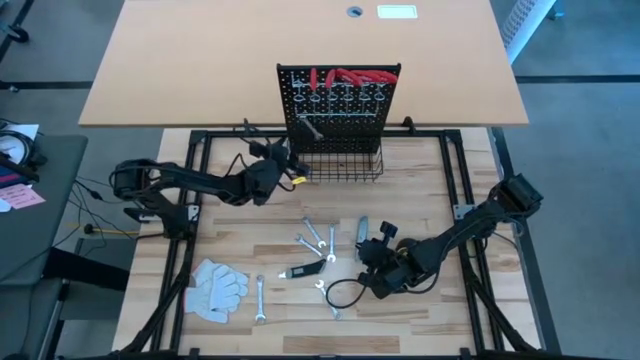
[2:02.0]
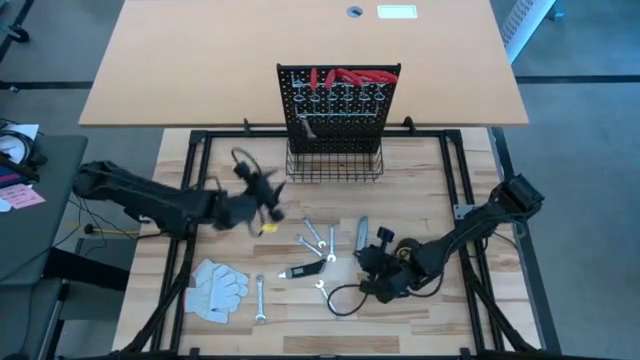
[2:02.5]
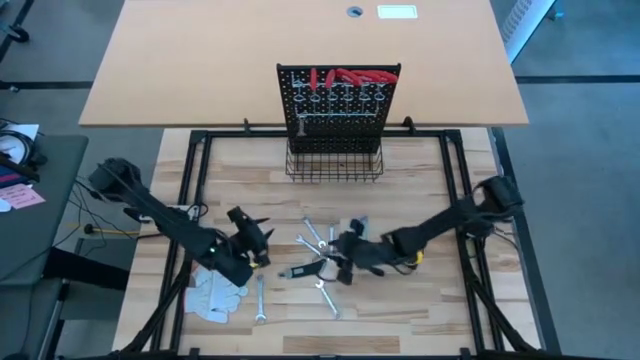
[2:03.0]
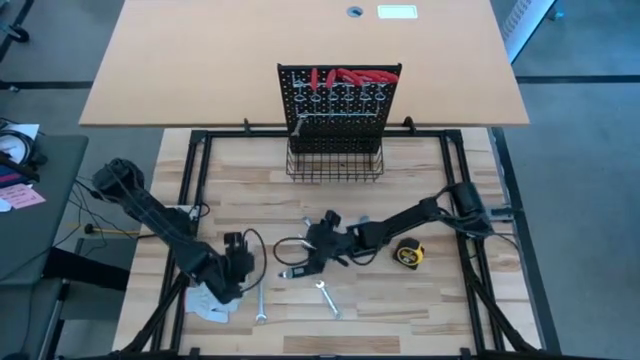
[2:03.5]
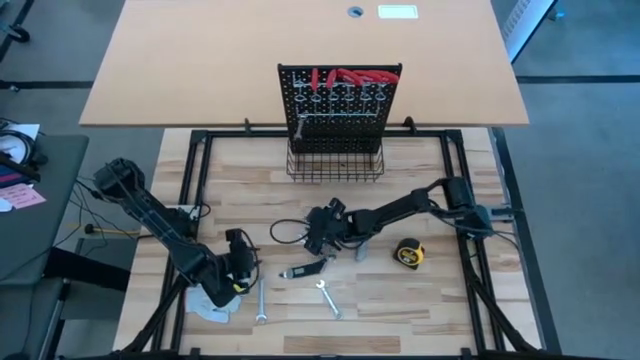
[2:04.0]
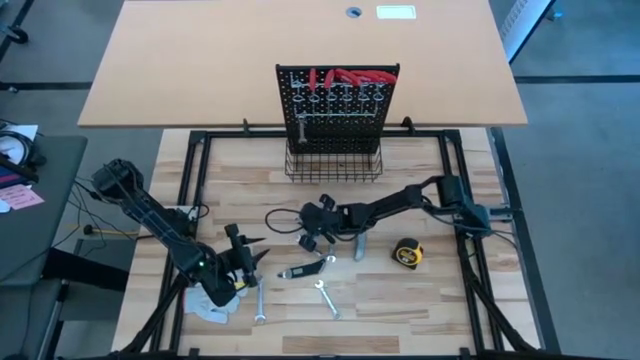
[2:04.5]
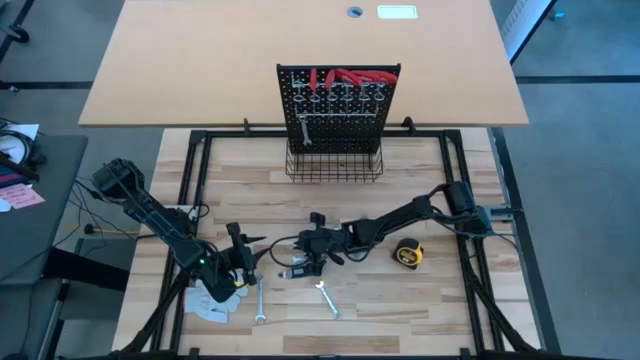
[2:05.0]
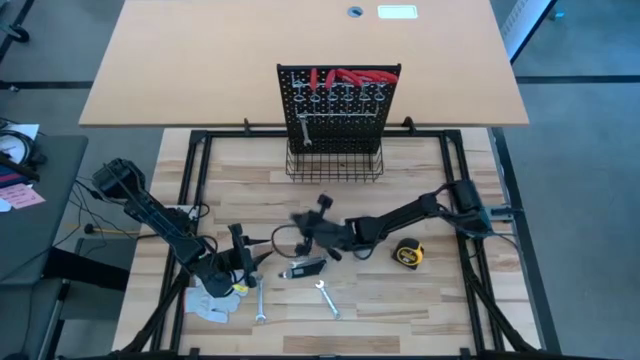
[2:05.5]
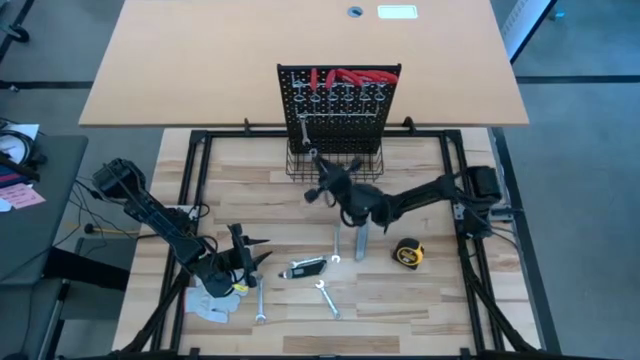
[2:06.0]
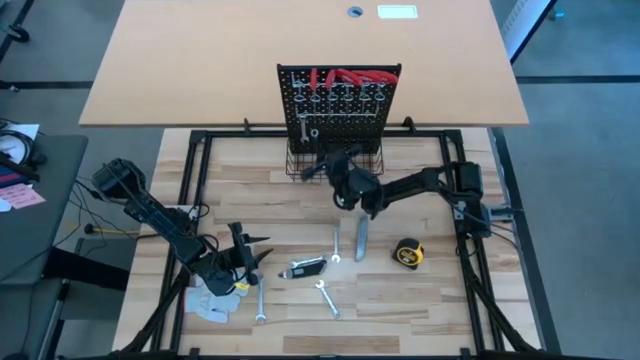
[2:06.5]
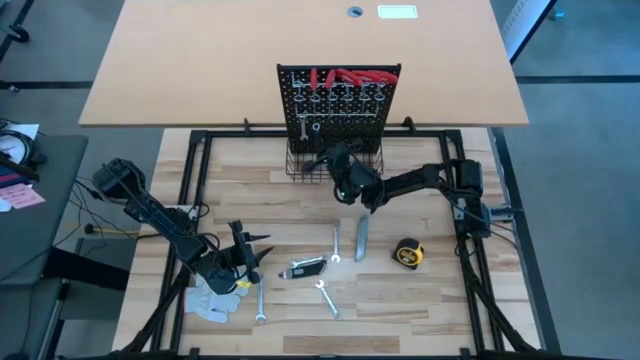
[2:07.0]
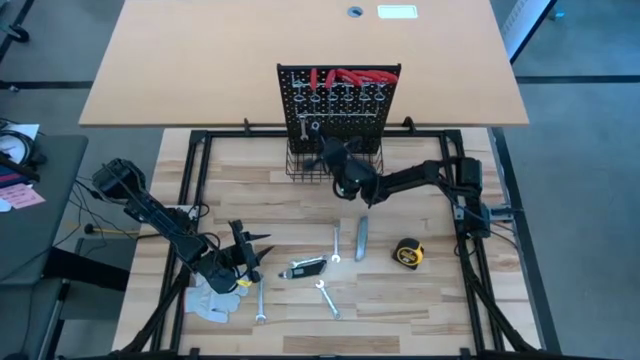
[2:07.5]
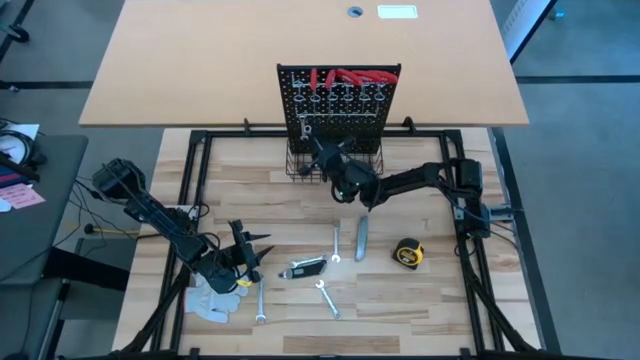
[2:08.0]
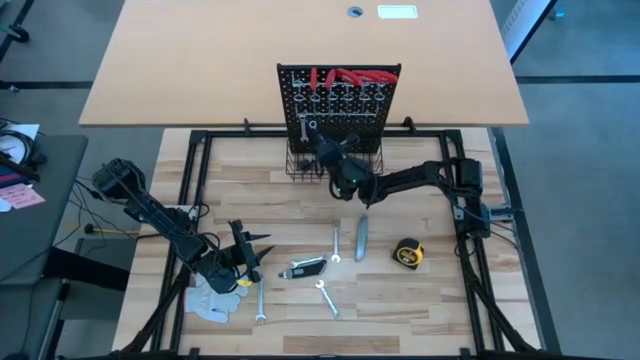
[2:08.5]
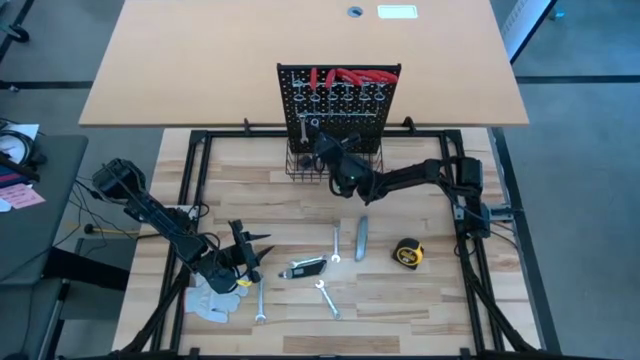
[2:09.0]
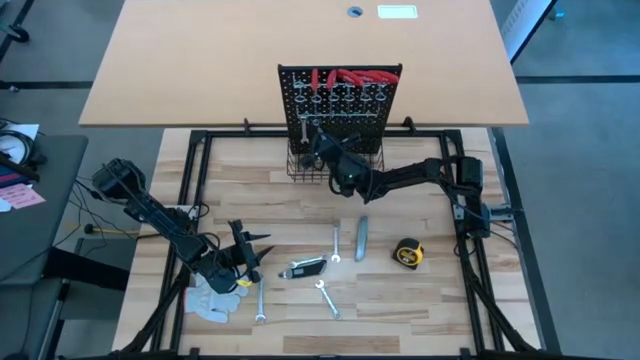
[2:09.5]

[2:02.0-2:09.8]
Task: Hang tools onto peg board
Hang the silver wrench on the pegboard

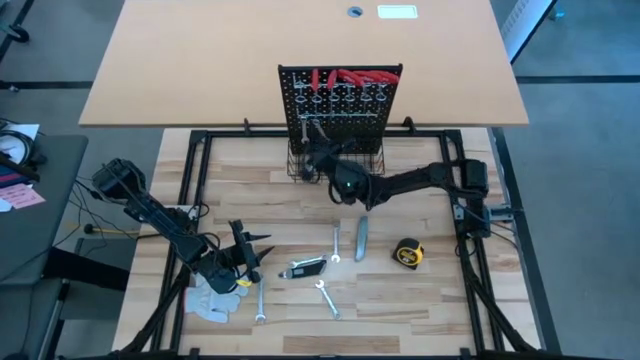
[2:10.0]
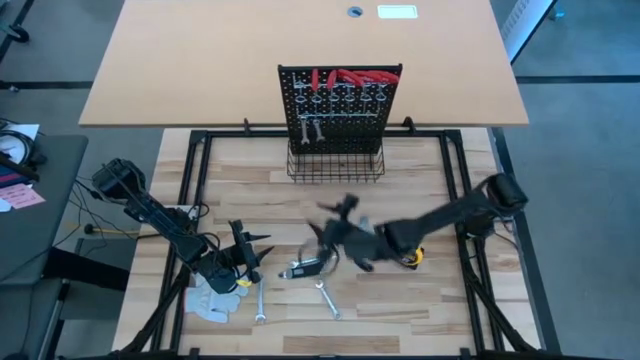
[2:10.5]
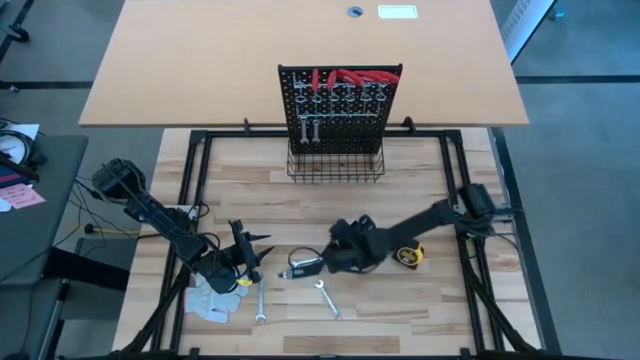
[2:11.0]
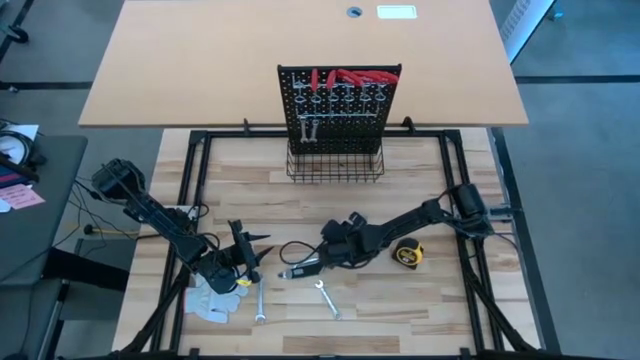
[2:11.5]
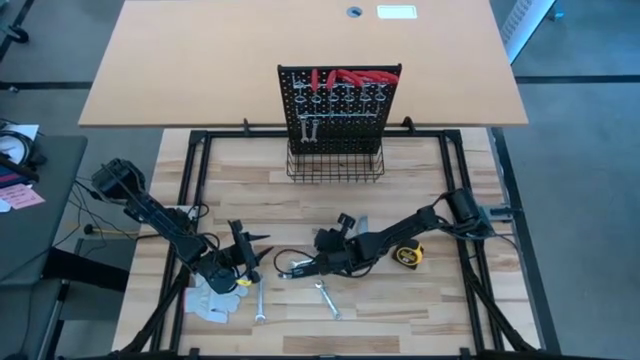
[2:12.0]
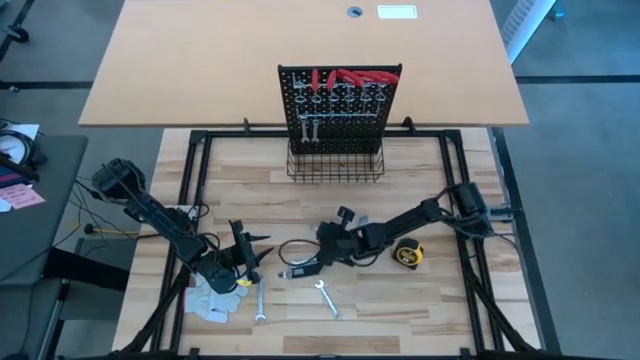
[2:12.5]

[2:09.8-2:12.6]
Hang the silver wrench on the pegboard

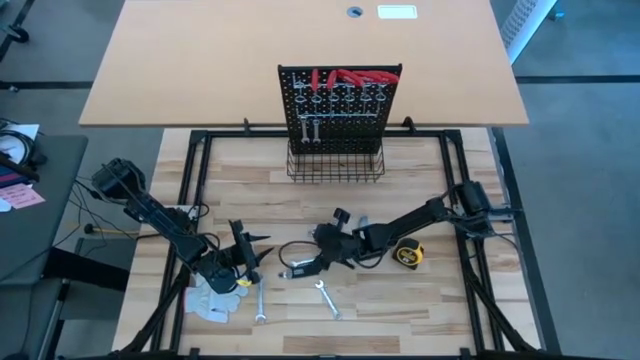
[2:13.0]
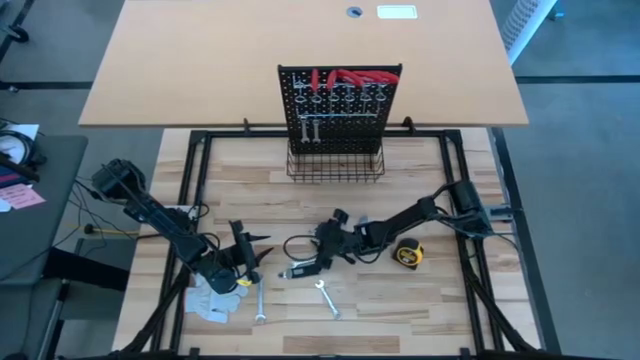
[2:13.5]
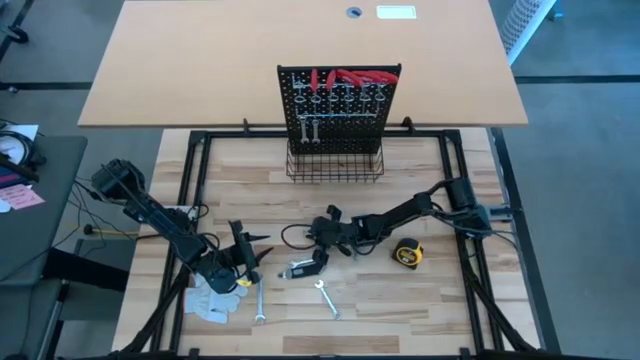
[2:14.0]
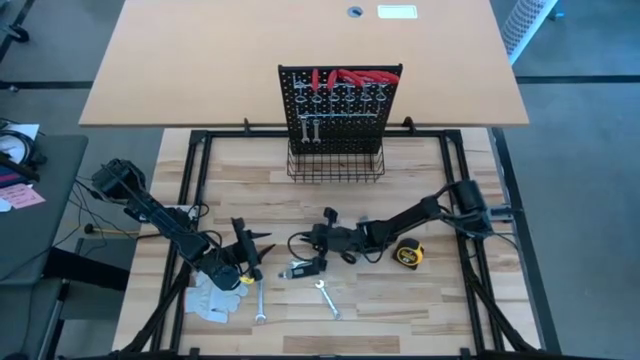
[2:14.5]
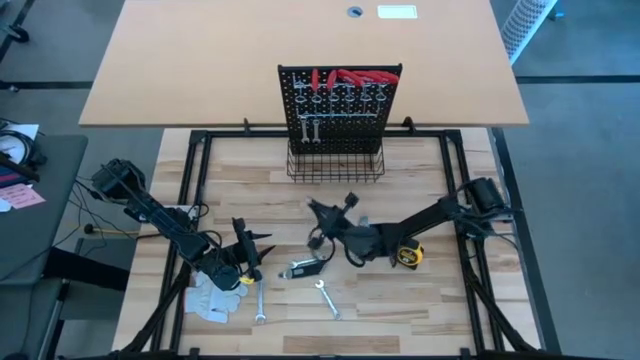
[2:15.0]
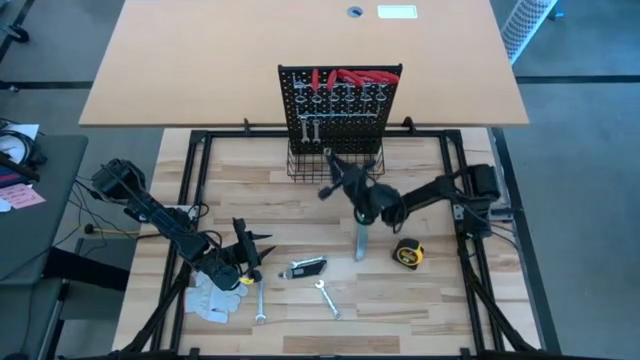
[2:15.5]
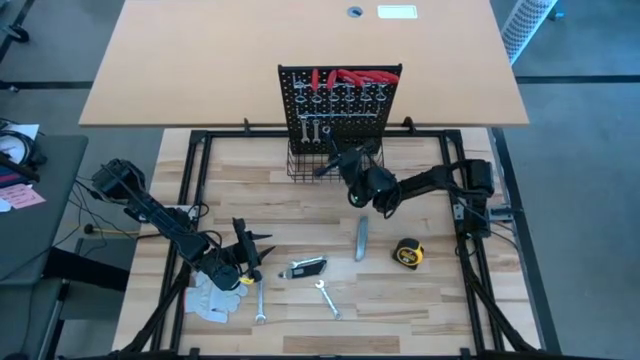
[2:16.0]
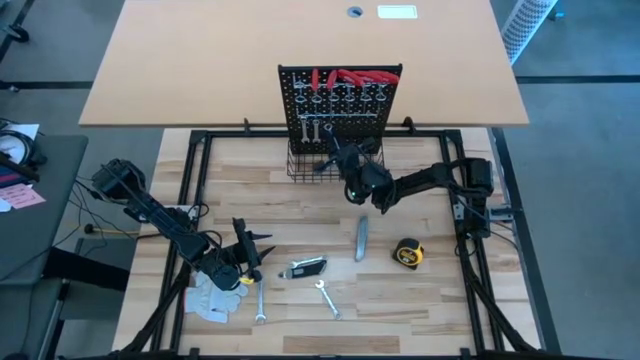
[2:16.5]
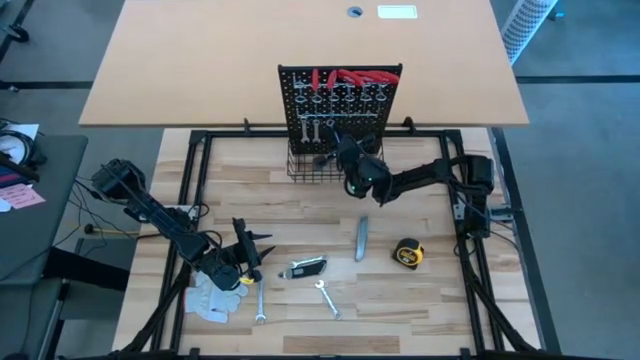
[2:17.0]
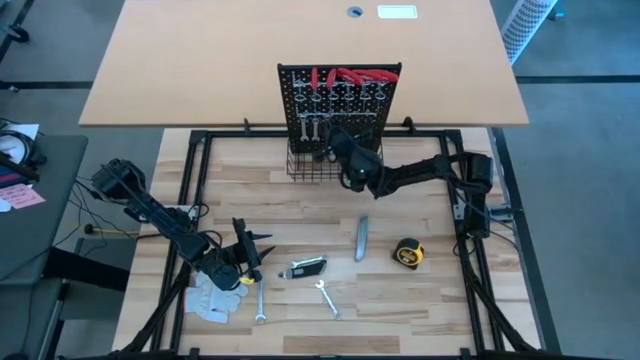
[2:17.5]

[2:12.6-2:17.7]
Hang the silver wrench on the pegboard

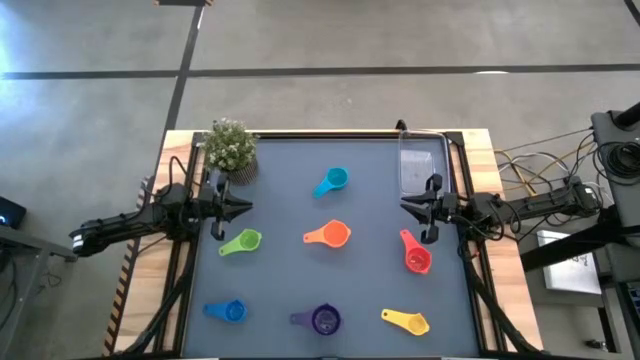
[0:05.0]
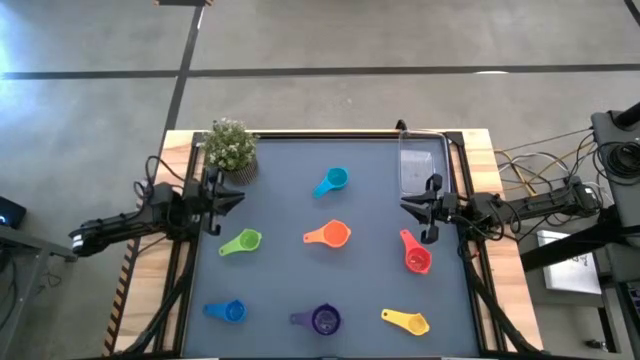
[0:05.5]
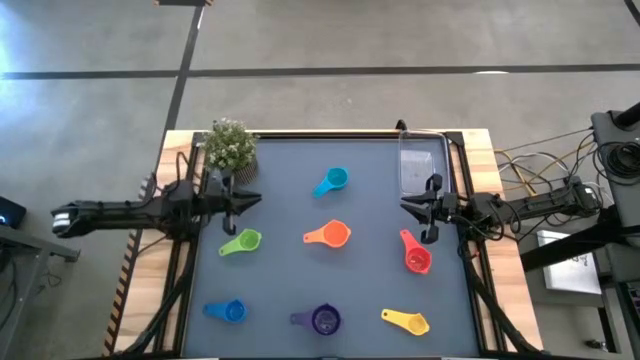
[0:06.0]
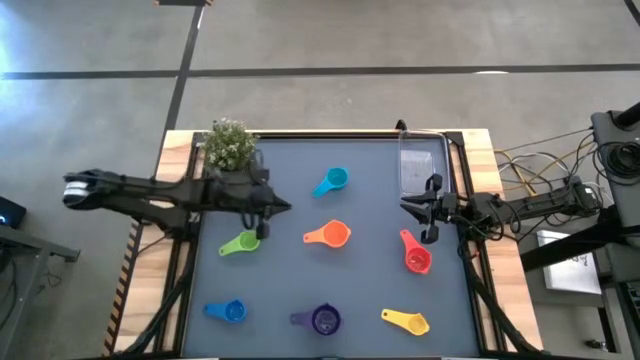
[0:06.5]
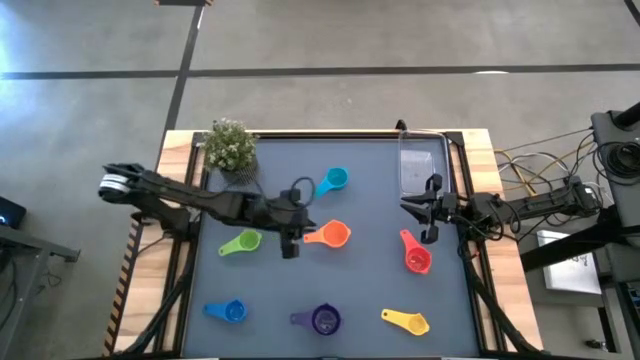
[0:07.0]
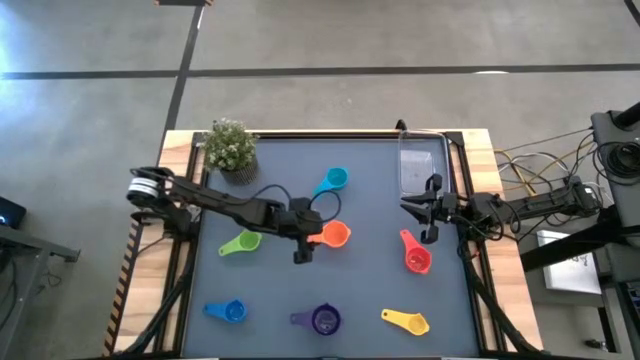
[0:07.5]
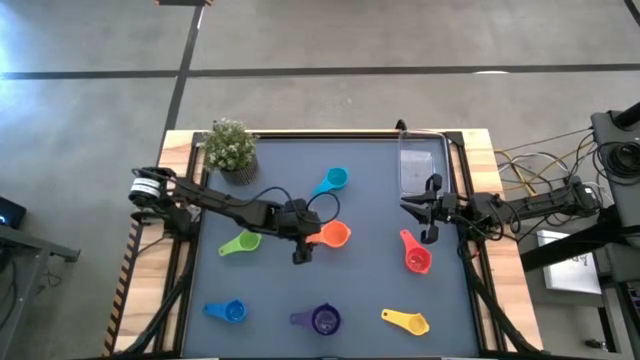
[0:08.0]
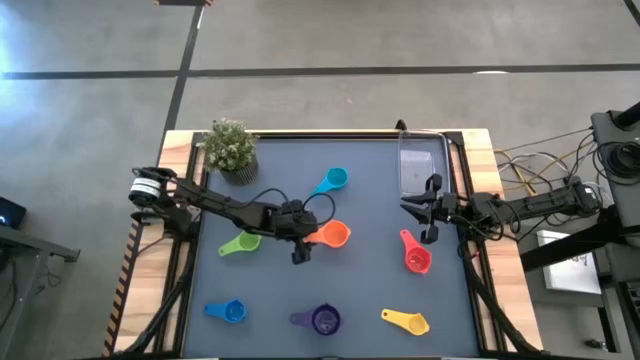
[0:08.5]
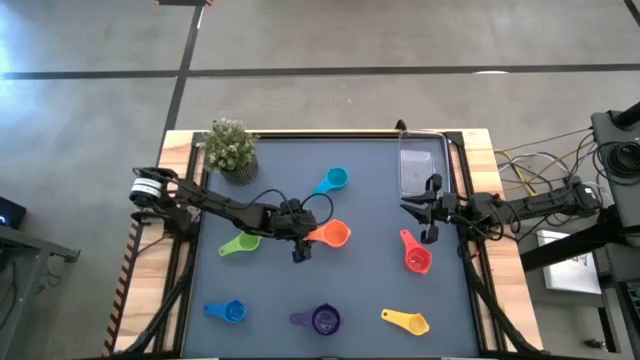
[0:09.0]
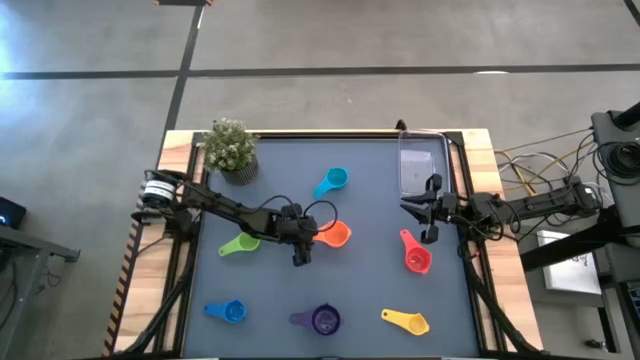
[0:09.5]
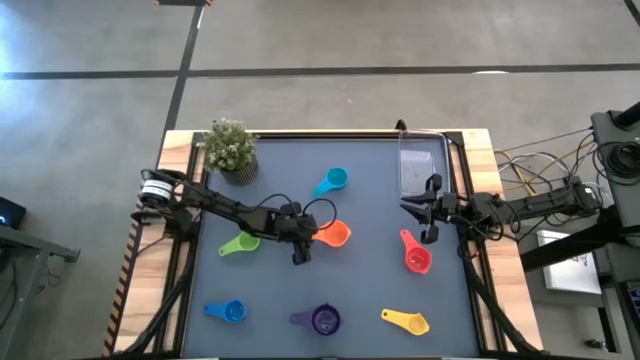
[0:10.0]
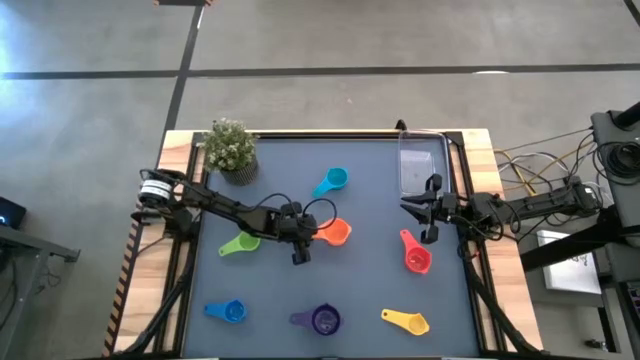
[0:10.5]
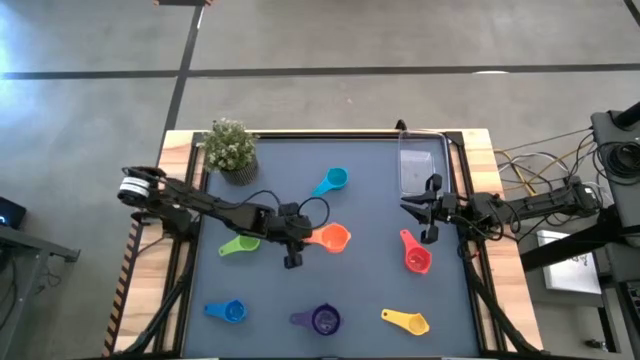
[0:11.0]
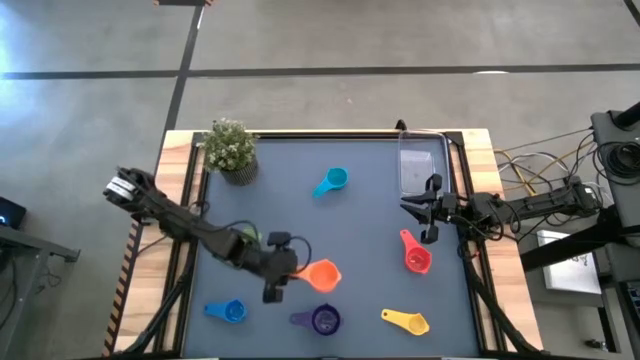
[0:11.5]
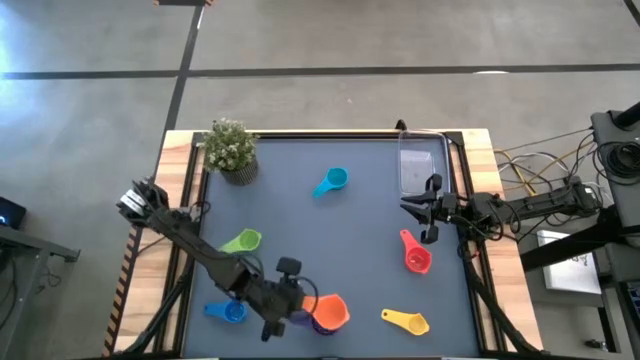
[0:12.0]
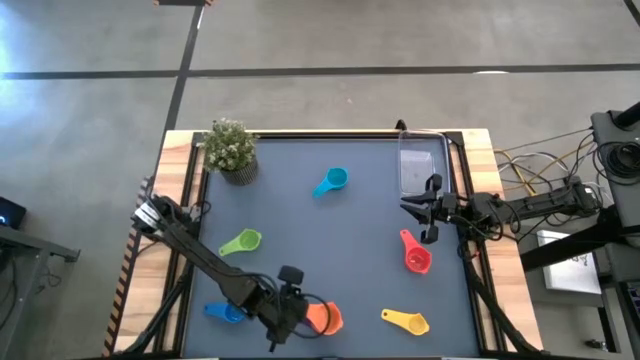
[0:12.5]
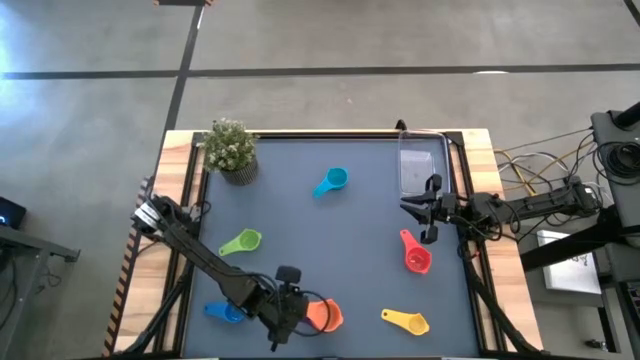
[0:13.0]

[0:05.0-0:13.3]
Task: Nest measuring cups in basket
Stack the orange measuring cup on top of the purple measuring cup
